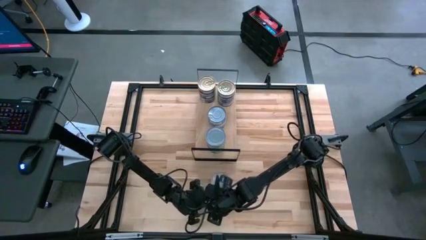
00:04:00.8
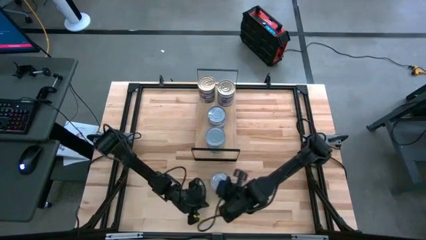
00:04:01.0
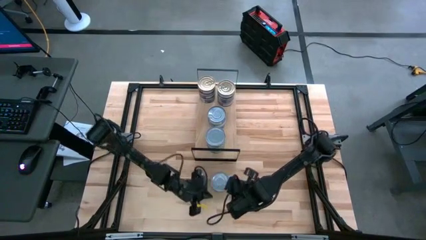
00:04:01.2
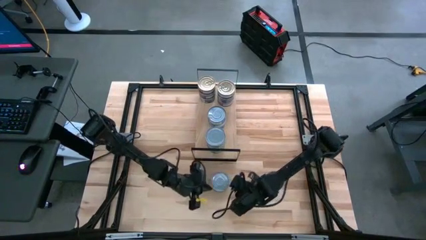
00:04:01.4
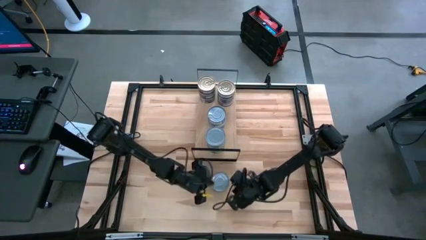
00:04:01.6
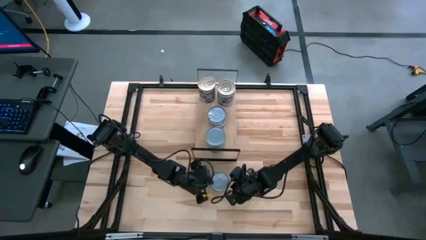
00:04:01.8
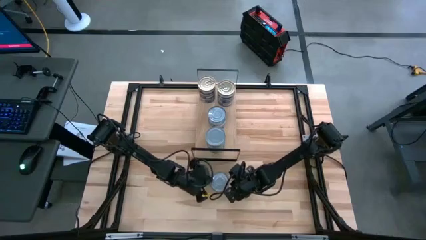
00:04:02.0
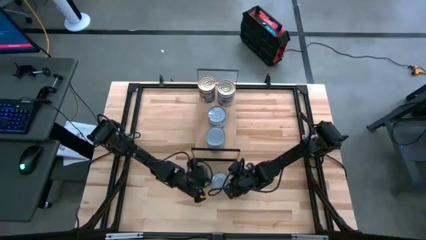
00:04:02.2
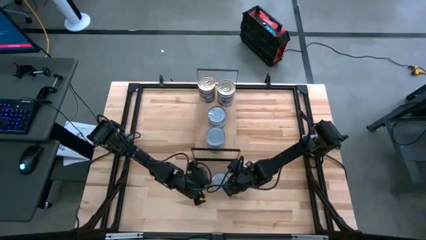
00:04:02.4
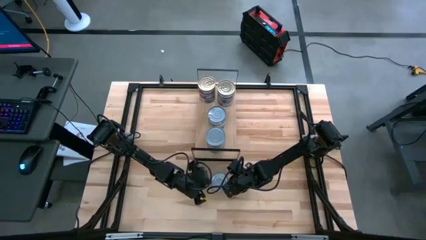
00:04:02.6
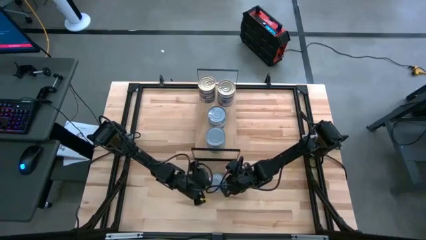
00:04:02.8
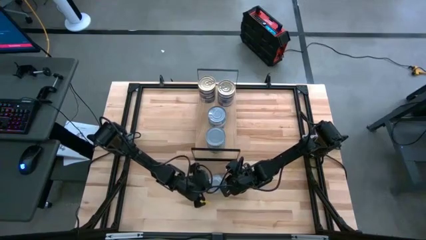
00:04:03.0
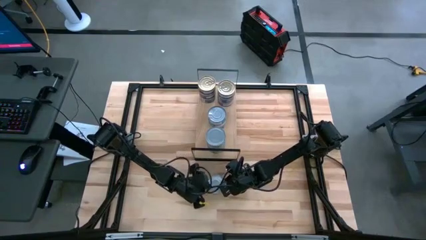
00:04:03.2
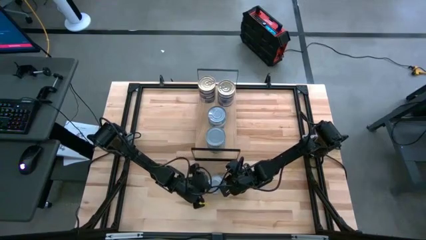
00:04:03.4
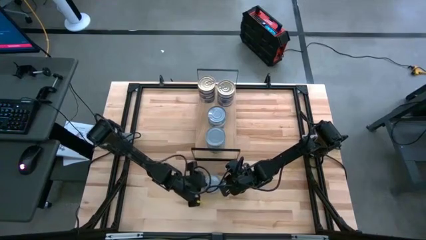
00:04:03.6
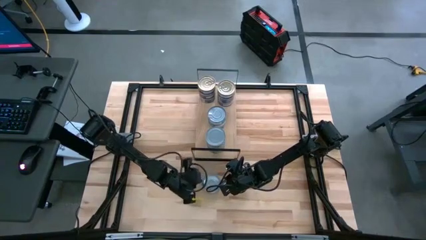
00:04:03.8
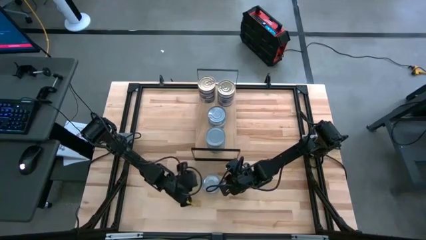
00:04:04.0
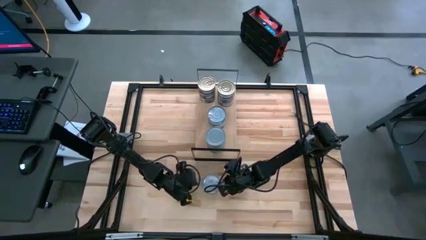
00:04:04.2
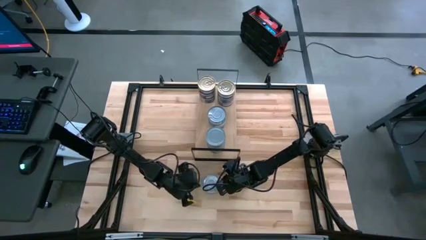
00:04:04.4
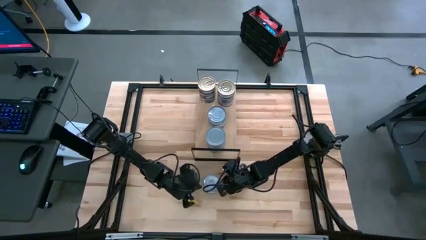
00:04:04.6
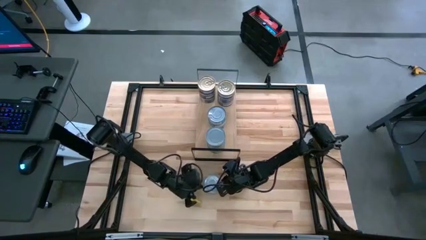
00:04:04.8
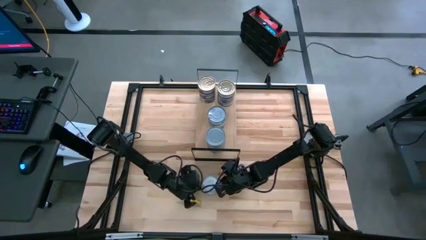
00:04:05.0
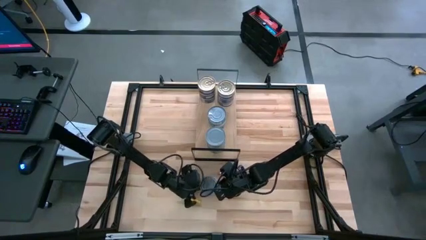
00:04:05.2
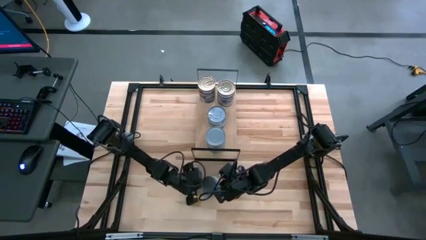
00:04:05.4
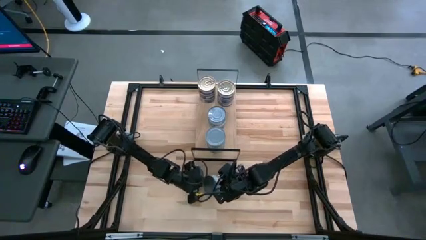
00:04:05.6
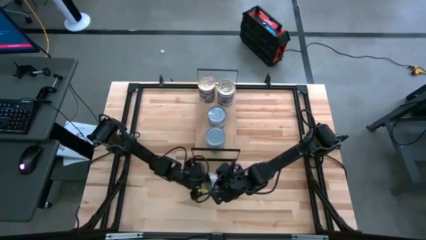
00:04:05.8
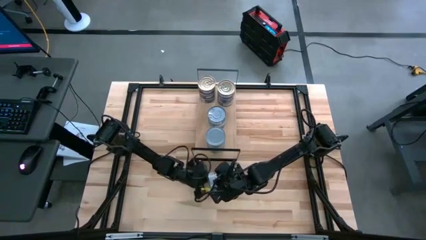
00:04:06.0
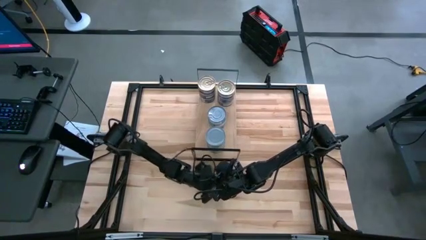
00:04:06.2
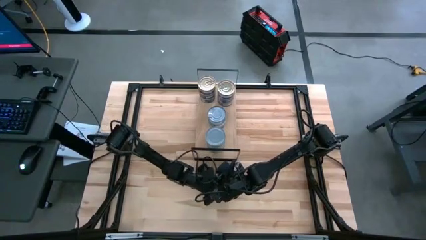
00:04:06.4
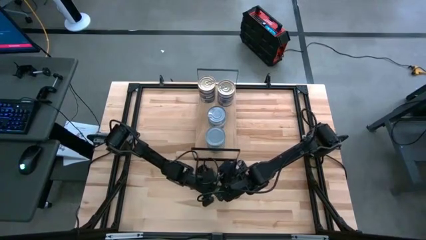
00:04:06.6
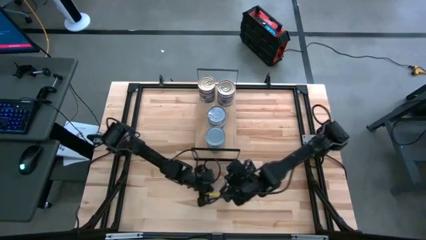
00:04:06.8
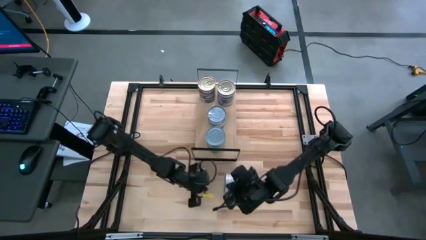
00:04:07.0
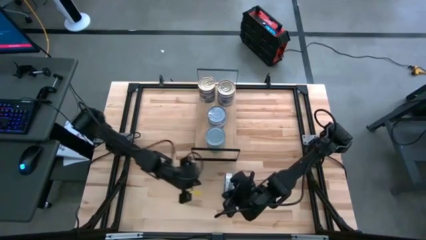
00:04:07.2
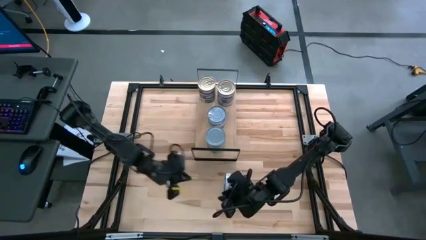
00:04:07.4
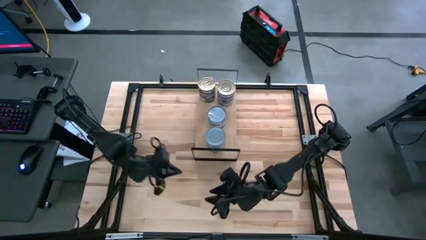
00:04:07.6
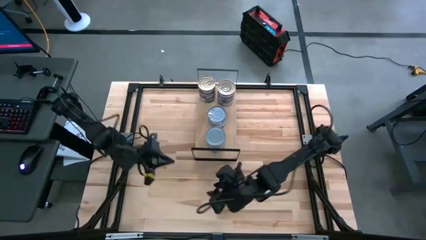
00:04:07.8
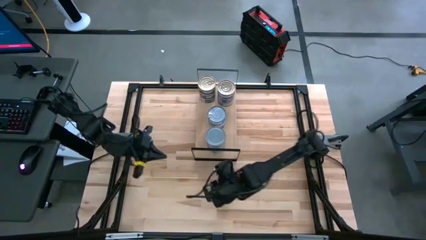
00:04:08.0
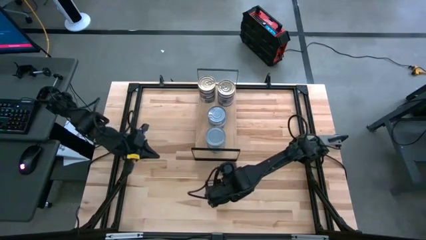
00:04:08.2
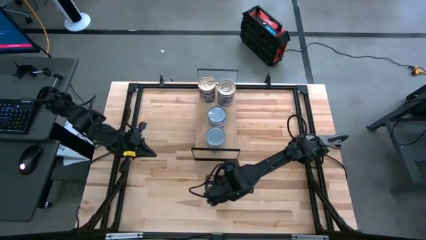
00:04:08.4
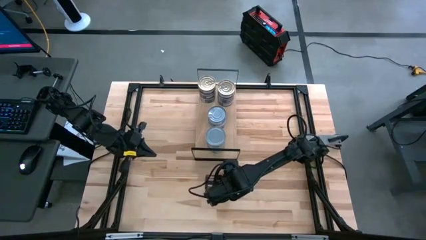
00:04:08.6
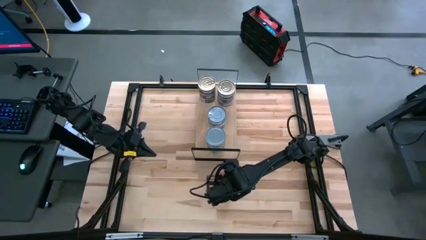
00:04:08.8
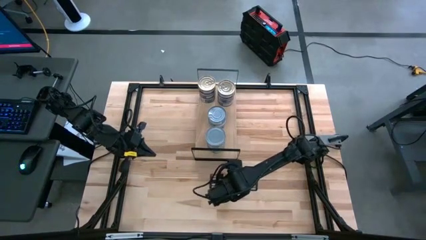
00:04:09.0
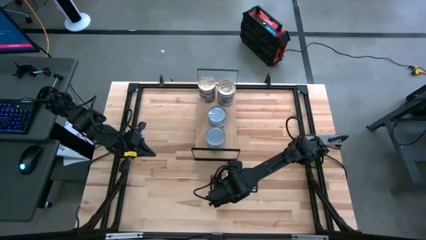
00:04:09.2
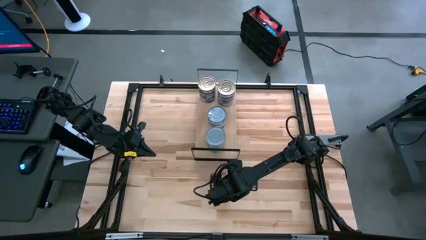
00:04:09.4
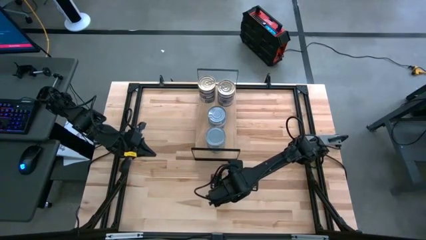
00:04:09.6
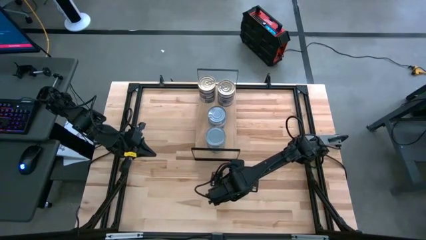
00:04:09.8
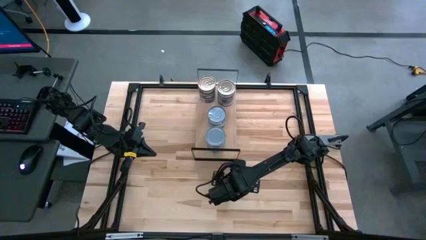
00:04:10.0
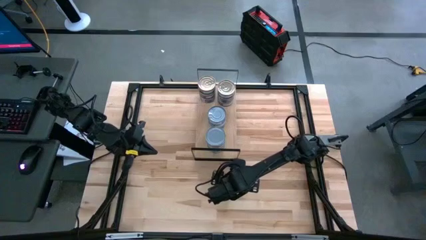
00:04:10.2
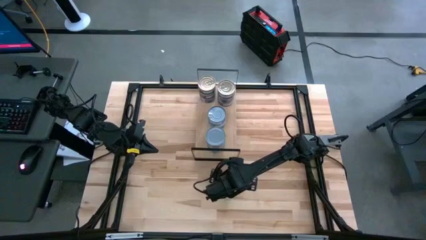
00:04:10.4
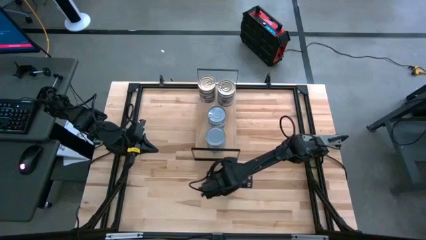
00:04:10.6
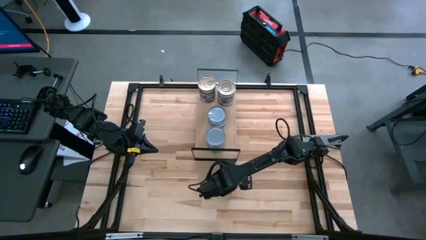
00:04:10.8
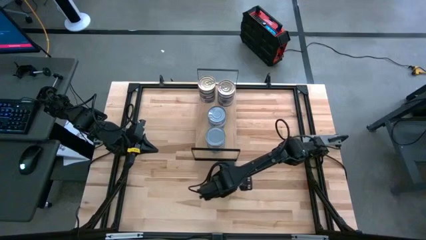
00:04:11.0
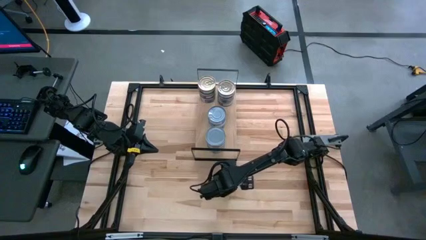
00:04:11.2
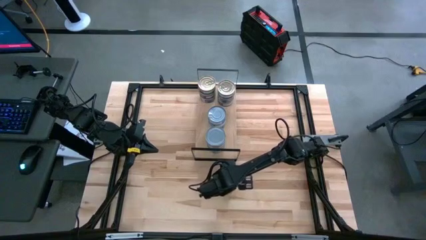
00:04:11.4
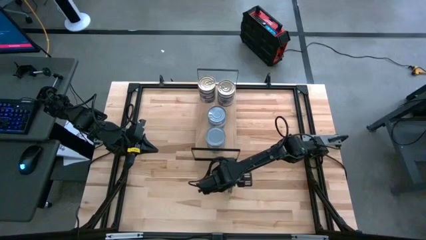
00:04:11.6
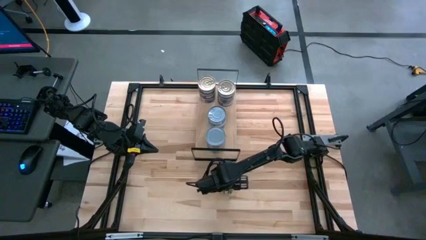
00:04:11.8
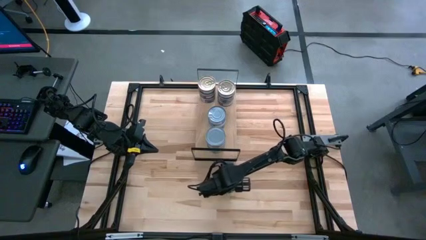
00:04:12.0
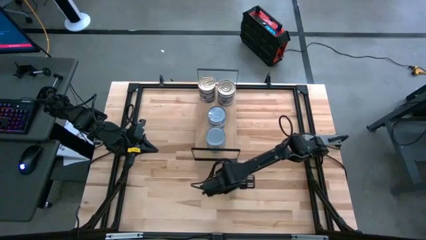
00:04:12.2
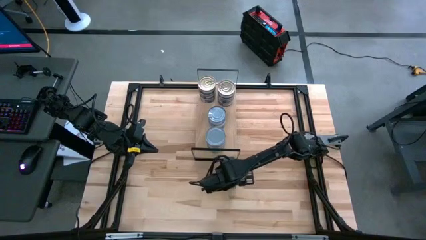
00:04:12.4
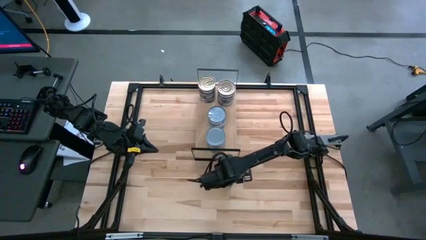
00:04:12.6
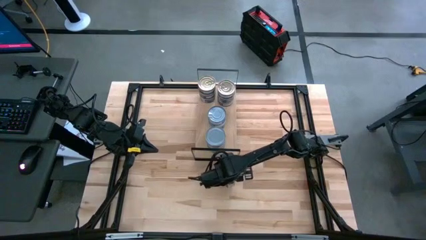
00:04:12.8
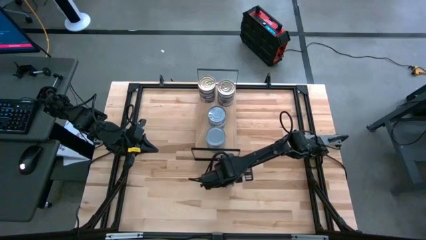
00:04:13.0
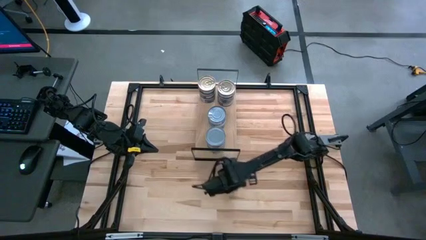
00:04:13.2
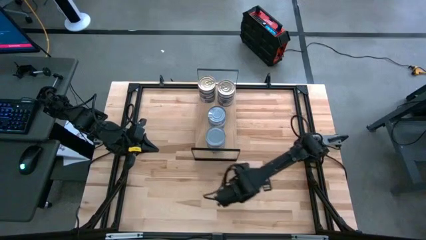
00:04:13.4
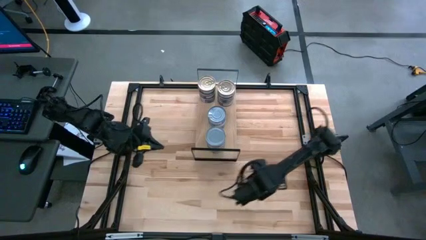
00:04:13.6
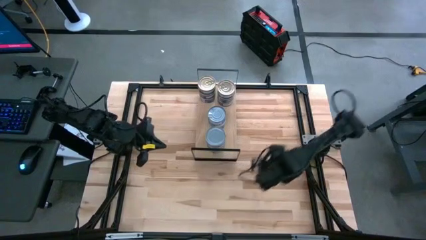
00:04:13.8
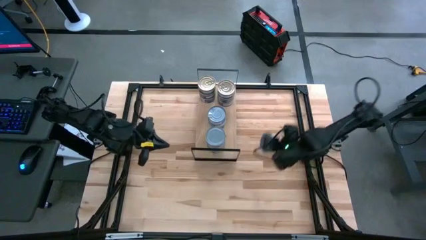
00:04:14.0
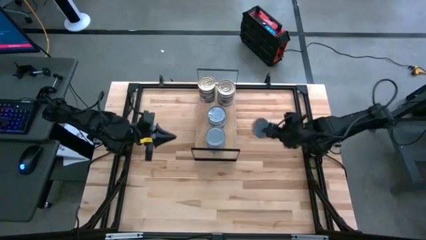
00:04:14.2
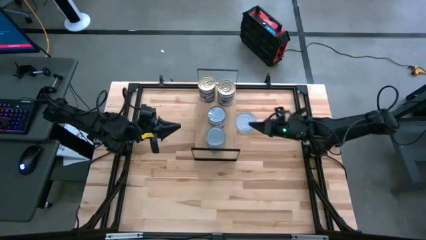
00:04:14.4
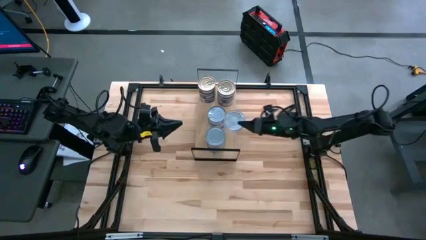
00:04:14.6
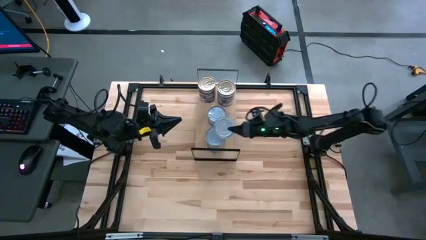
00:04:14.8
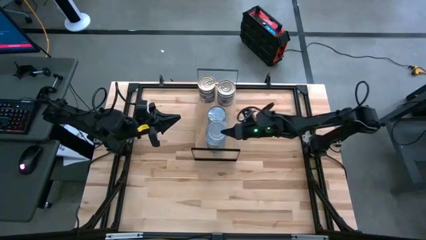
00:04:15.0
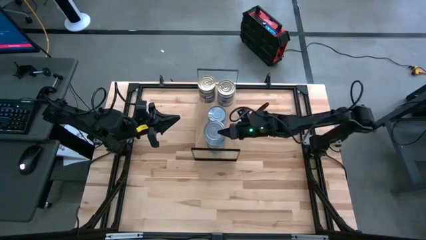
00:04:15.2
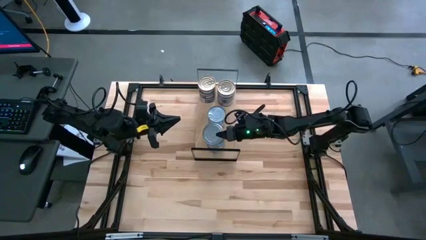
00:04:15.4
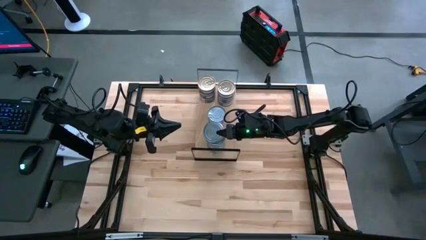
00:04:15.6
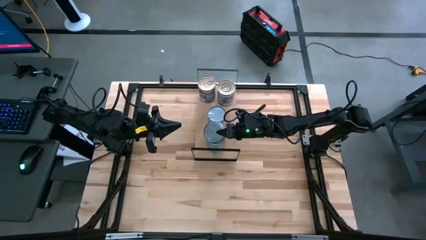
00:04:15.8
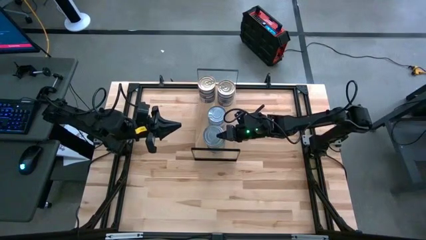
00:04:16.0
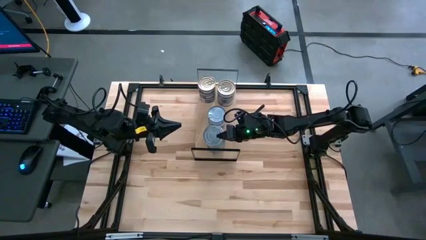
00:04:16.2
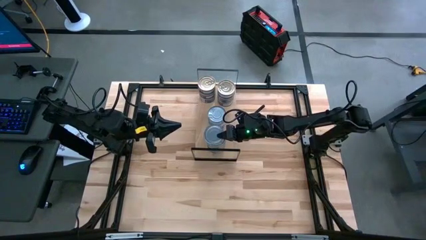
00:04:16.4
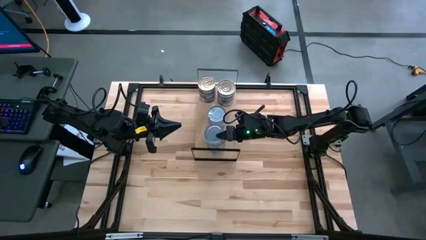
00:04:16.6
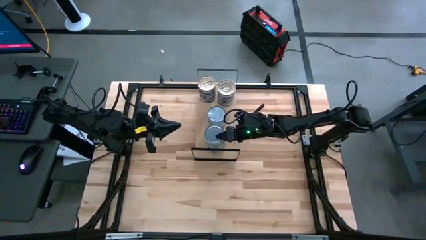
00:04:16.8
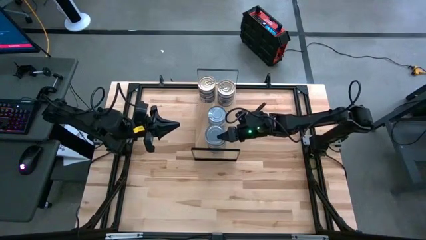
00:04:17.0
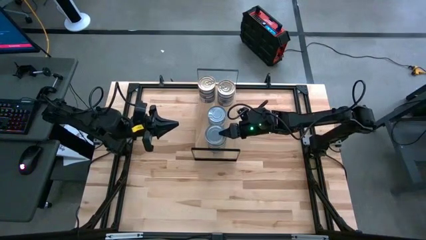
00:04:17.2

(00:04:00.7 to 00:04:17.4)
Task: Stack canned seafood by type on shelf
Stack the green tuna can on top of the other green tuna cans on the shelf
